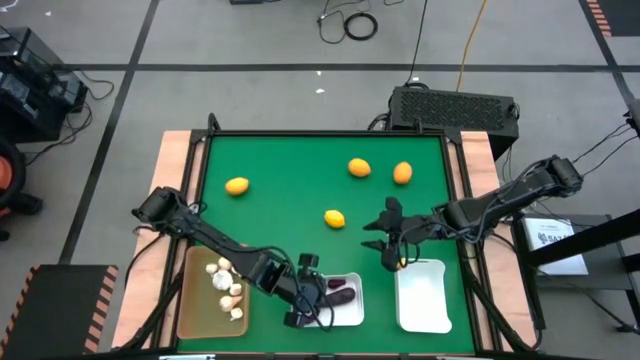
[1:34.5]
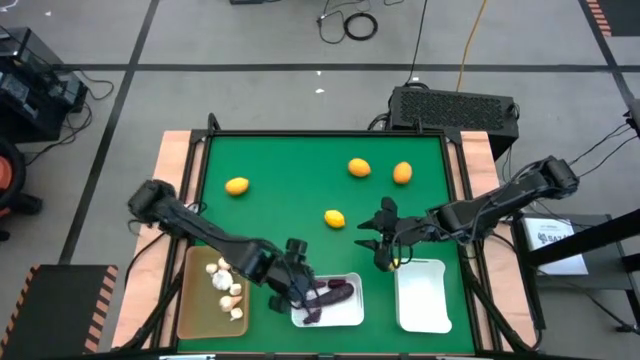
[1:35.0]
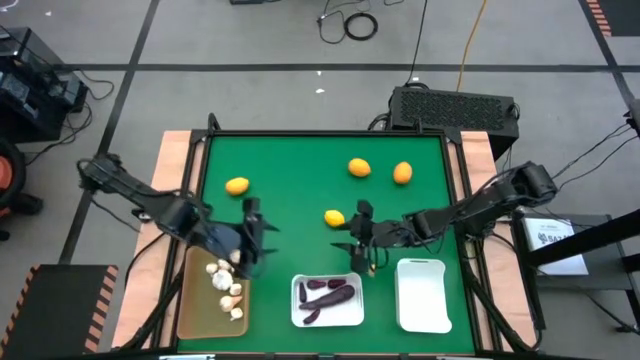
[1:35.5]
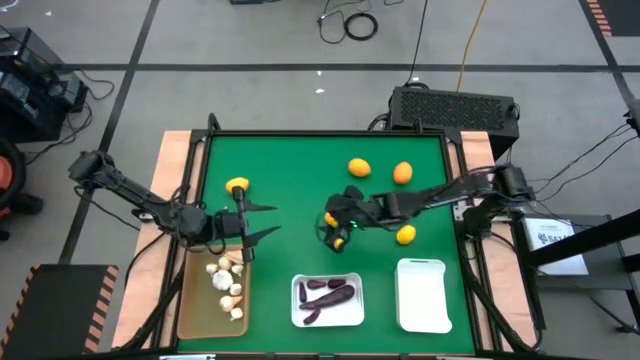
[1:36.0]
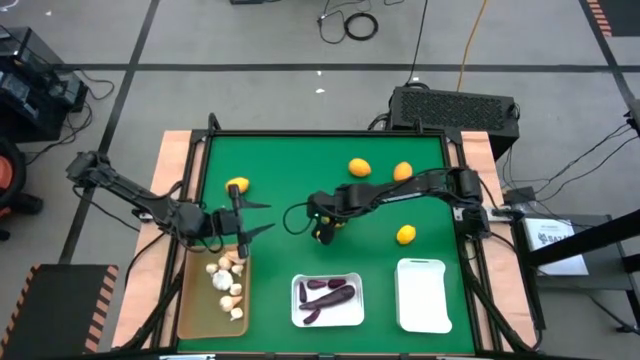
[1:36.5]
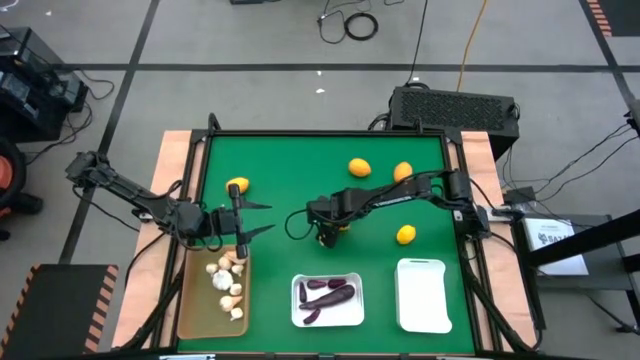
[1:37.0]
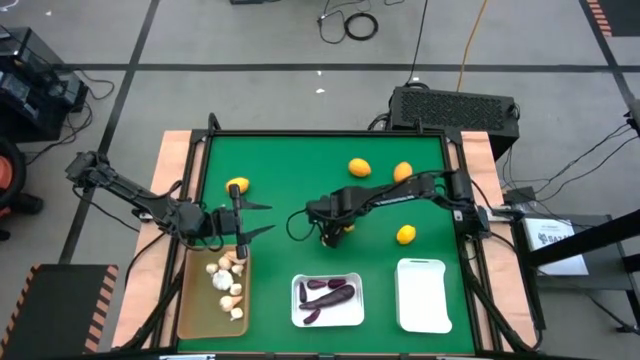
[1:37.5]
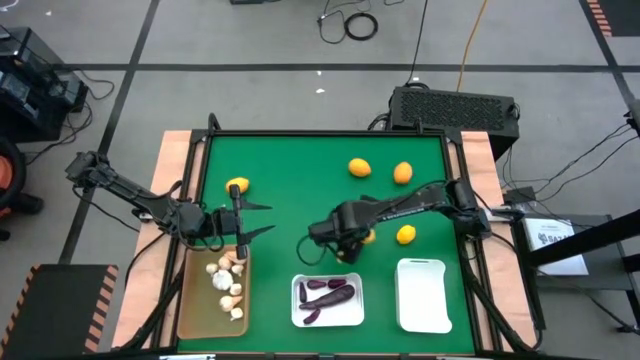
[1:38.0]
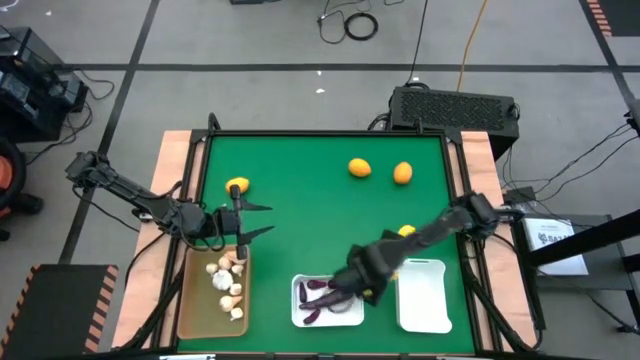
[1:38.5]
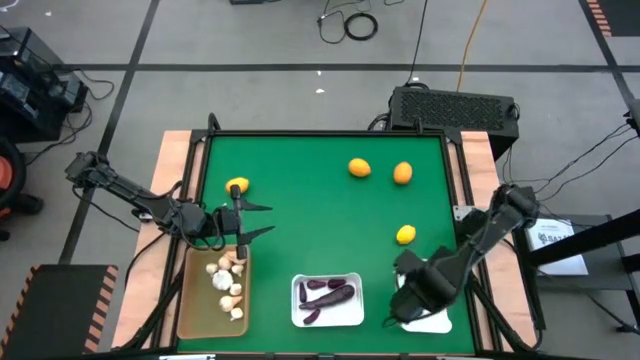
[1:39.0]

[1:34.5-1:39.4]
Task: Sort produce into baskets
Put the lemon into the right white bin

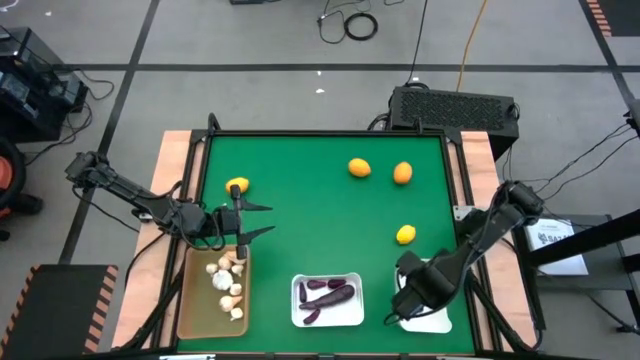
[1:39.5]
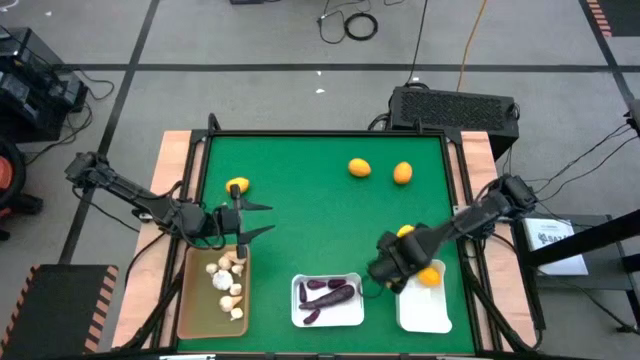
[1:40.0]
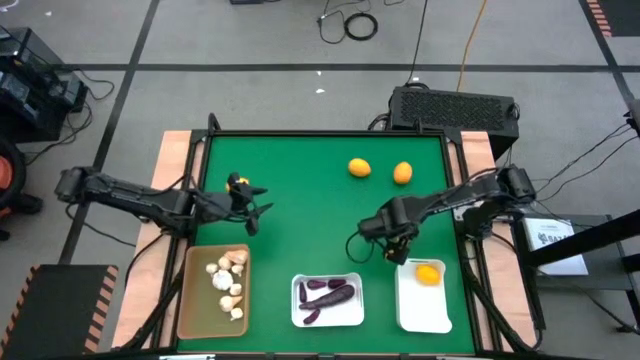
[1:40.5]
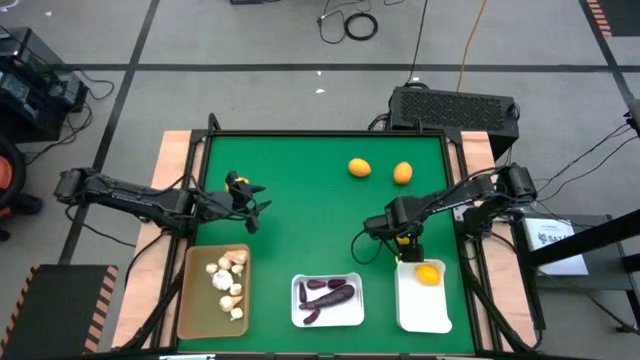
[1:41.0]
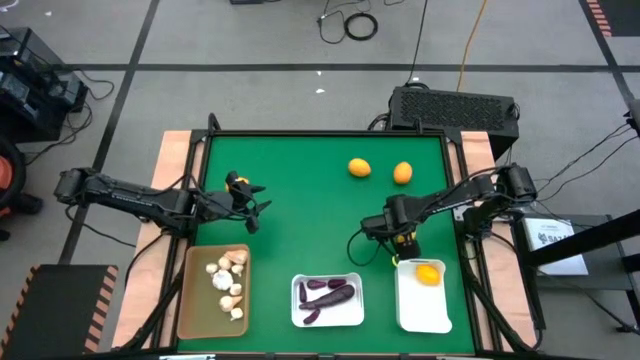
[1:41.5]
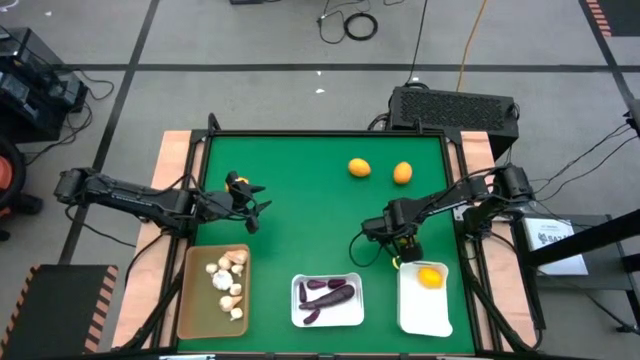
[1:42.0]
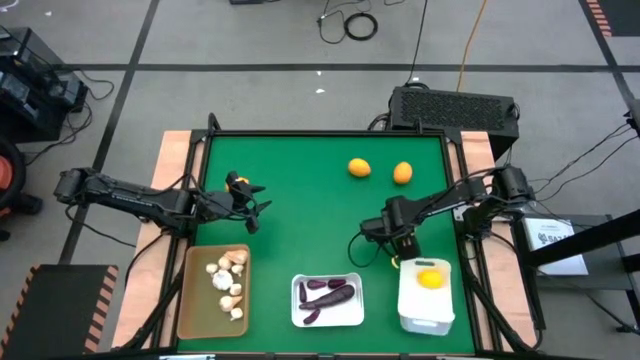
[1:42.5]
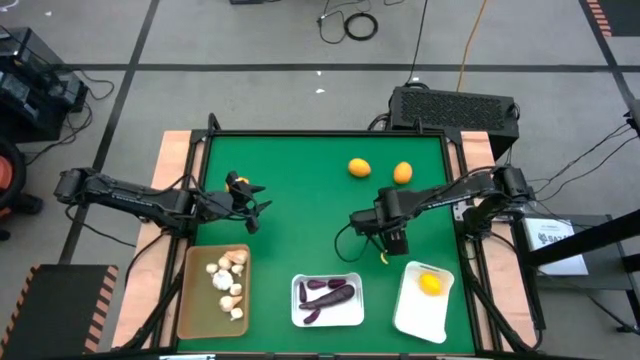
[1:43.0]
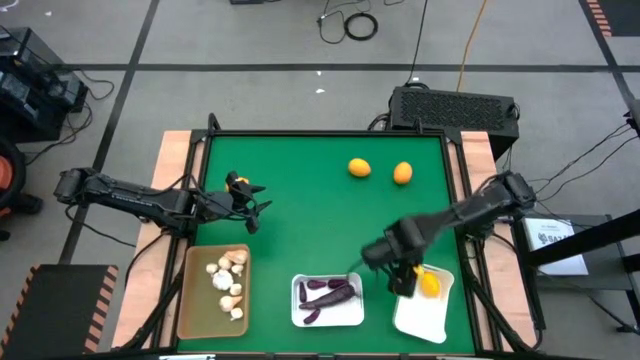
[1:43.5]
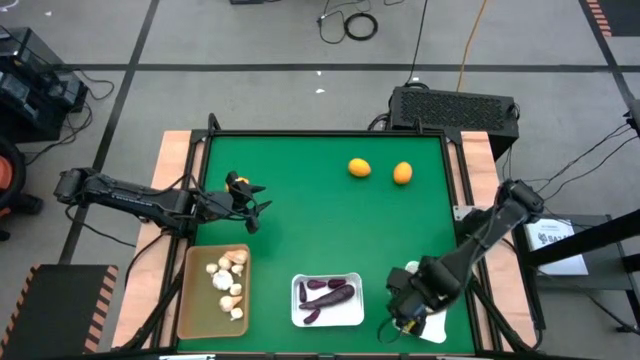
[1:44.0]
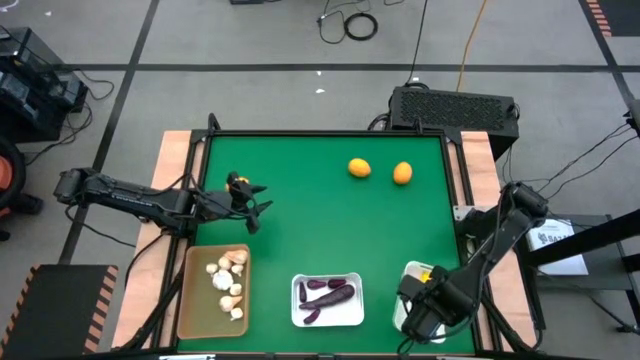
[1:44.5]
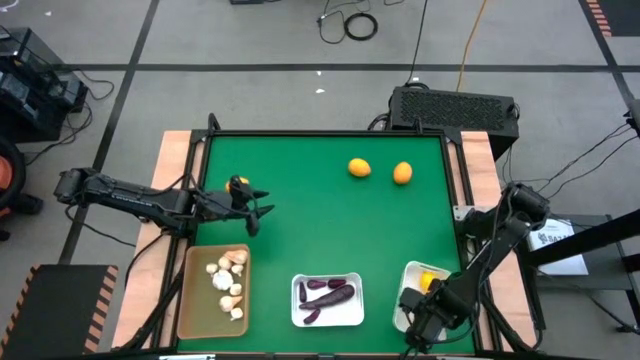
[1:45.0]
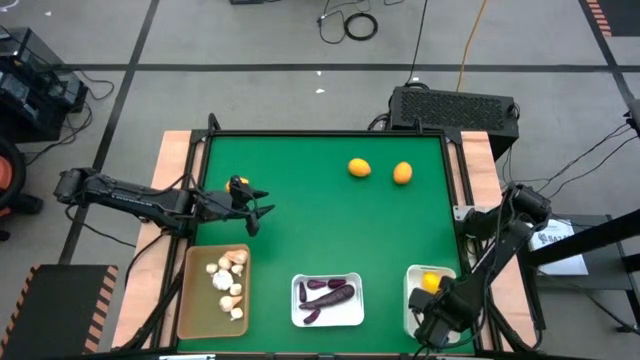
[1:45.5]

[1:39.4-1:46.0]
Put the lemon into the right white bin

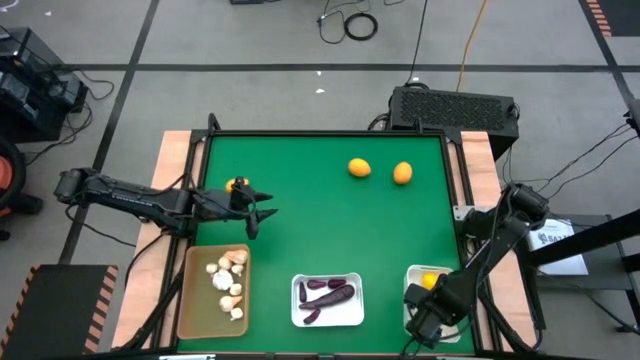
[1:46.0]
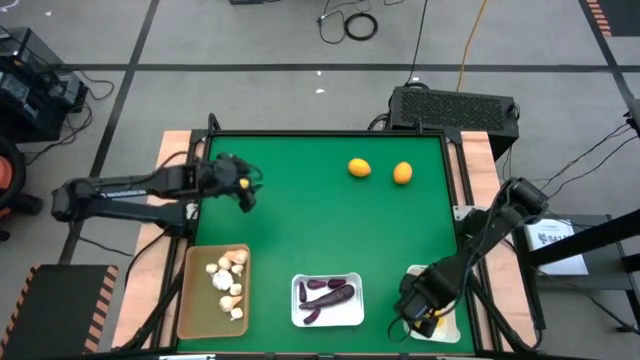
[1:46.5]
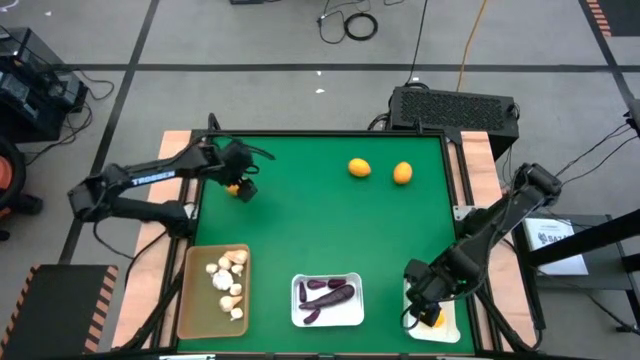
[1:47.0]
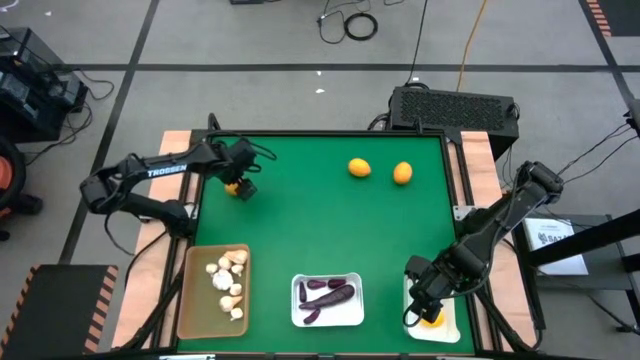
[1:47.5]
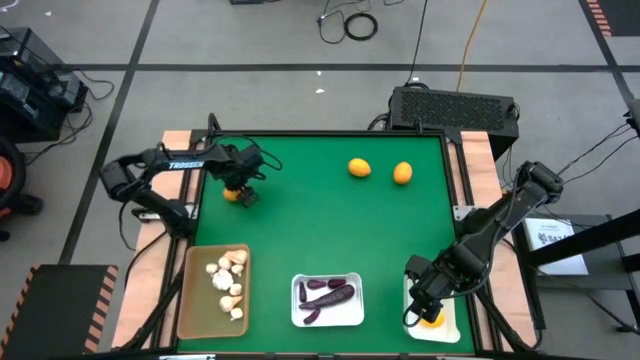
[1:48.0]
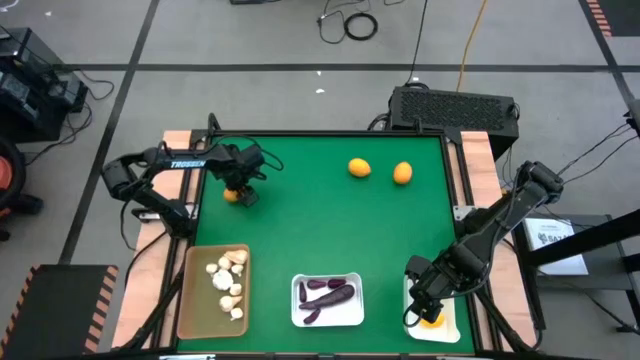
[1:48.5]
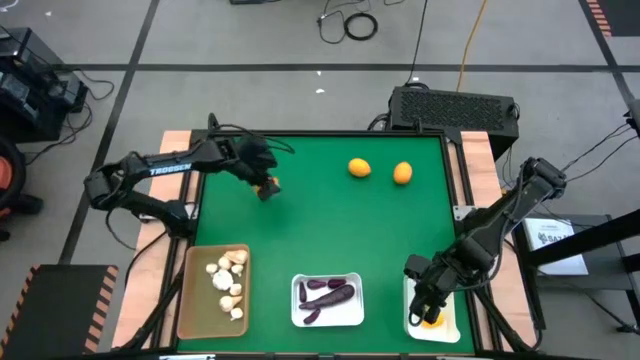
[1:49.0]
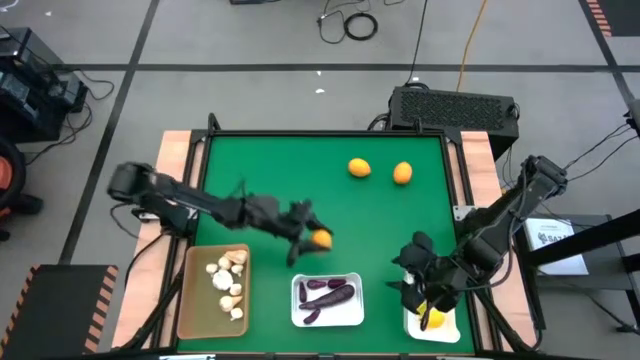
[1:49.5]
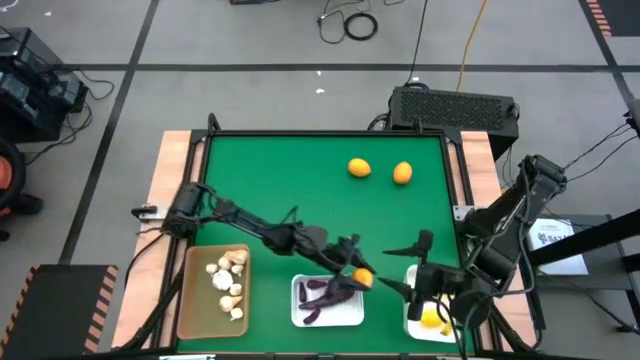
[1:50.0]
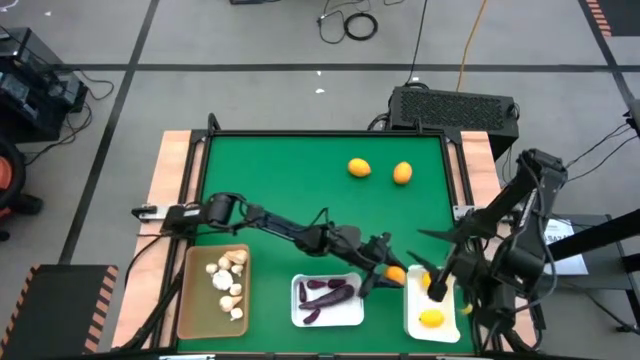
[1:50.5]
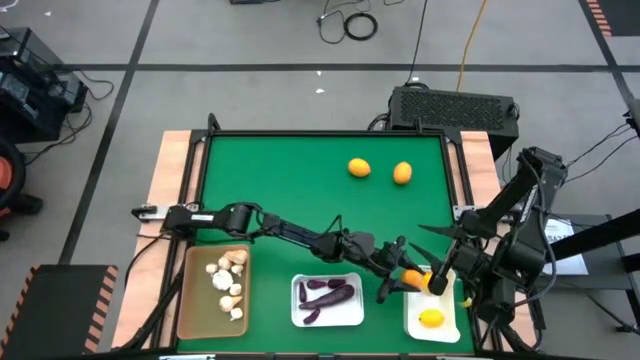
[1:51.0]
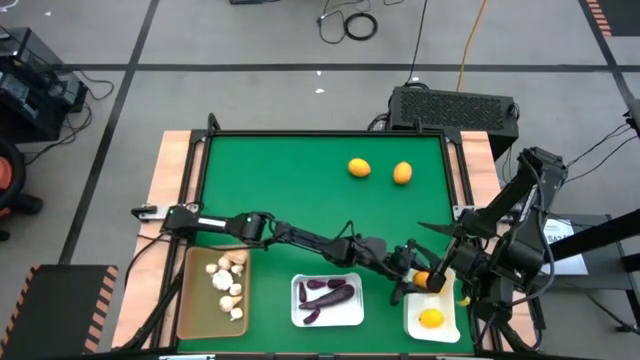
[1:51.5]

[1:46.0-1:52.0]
Put the lemon into the right white bin

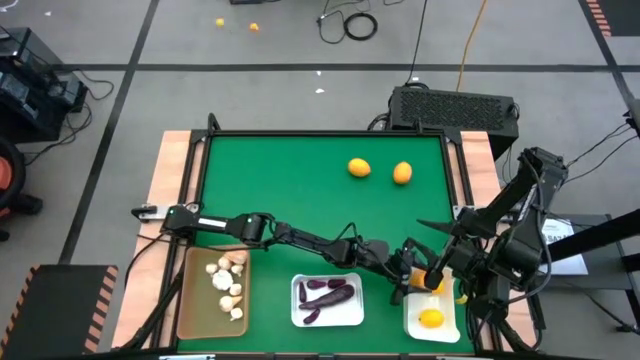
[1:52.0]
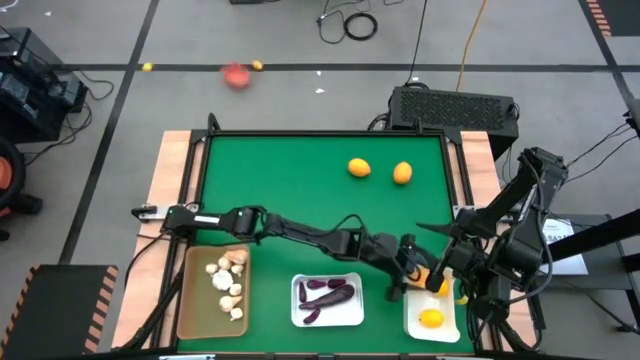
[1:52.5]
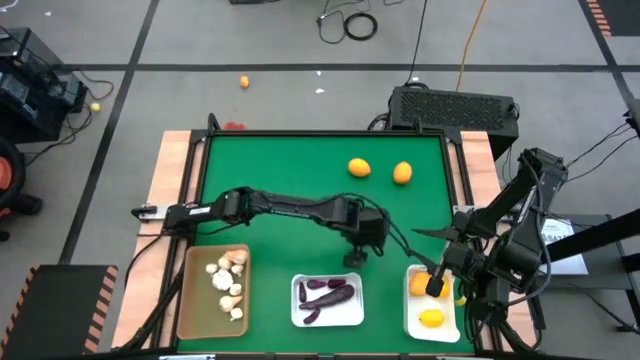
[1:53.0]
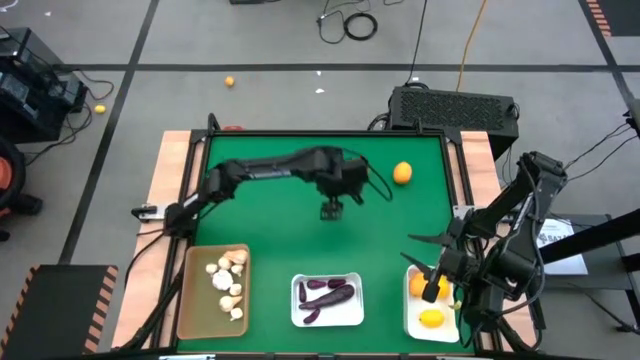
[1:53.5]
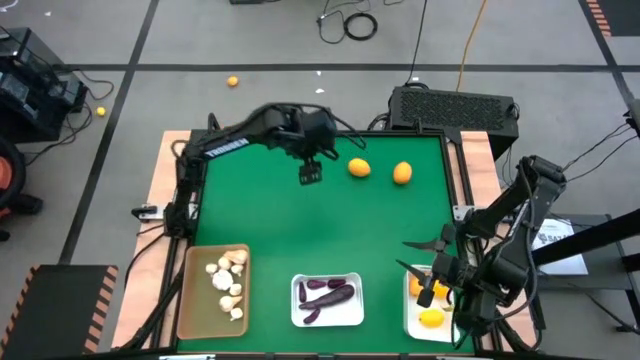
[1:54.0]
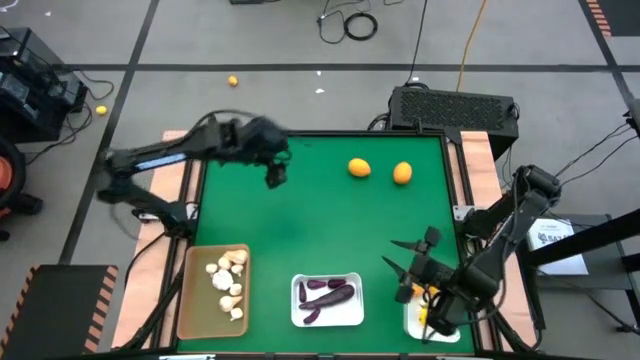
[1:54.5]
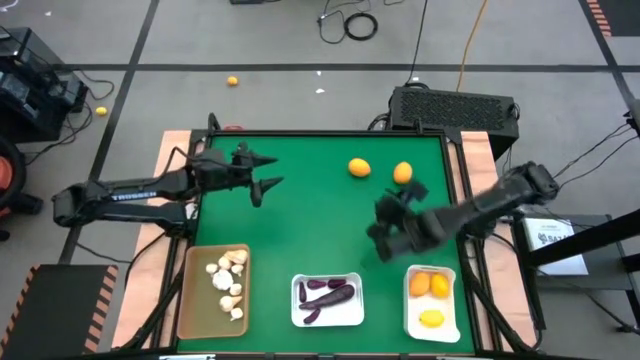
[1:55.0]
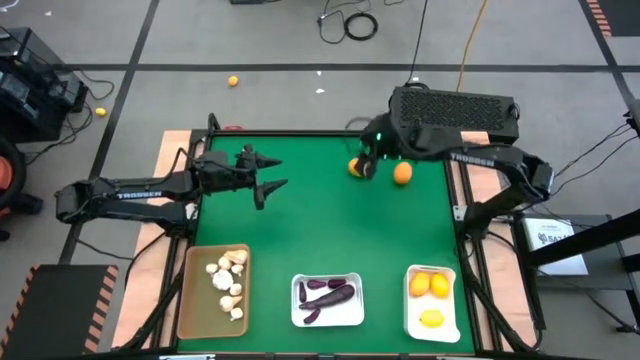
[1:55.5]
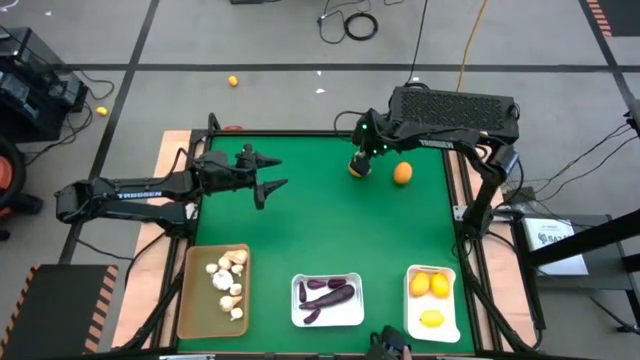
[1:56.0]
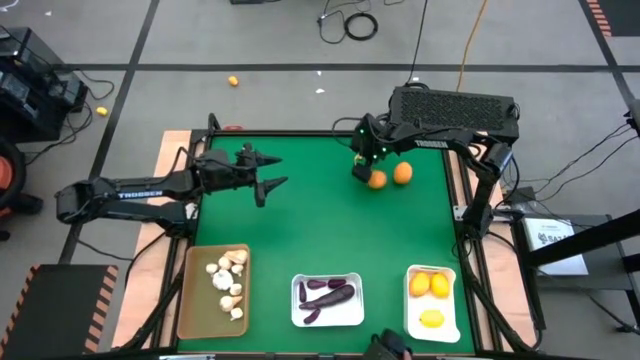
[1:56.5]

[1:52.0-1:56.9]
Put the lemon into the right white bin

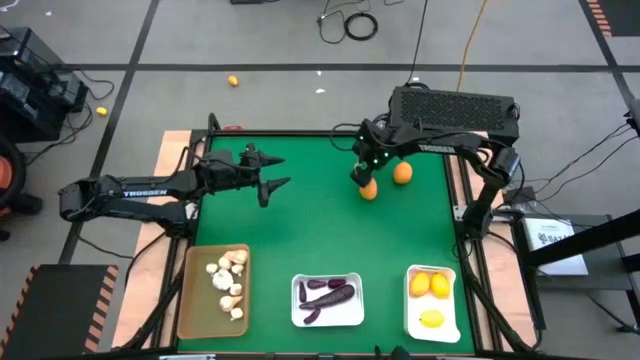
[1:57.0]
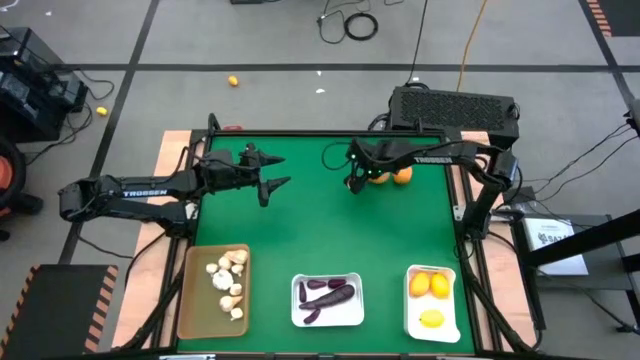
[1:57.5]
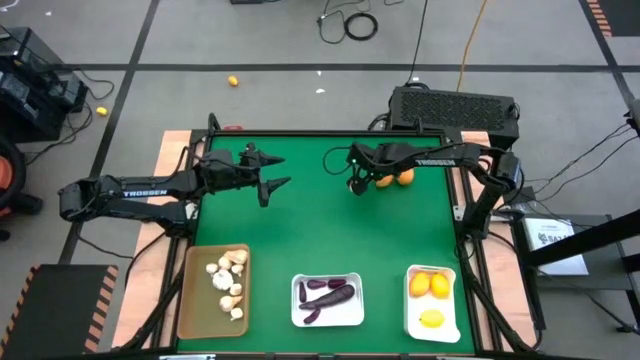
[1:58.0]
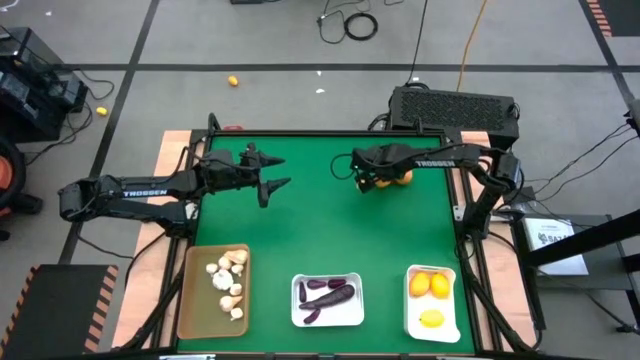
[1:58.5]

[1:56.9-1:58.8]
Put the lemon into the right white bin
